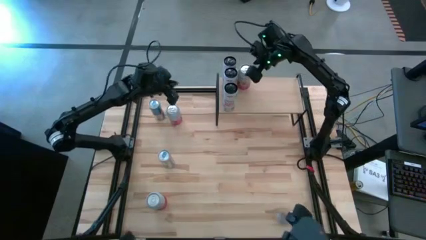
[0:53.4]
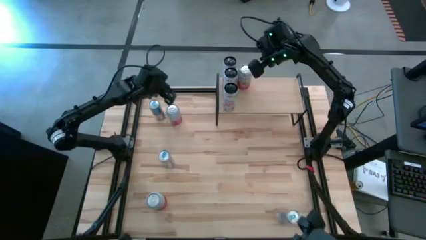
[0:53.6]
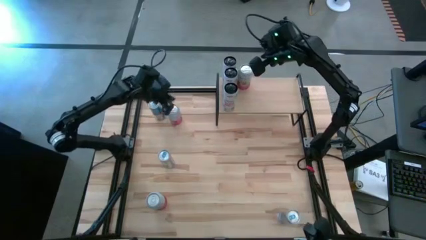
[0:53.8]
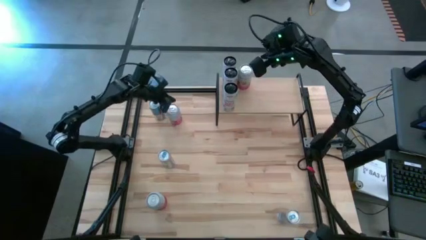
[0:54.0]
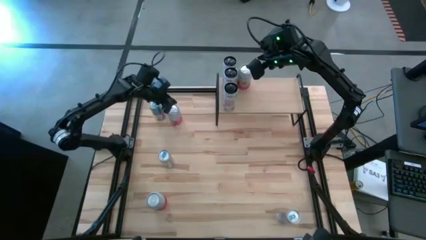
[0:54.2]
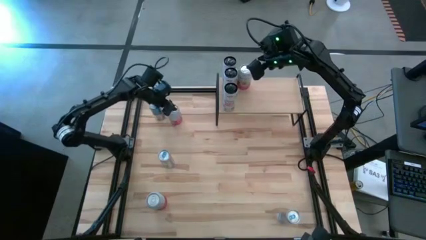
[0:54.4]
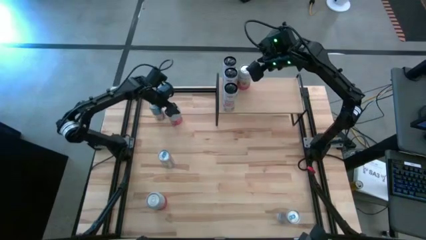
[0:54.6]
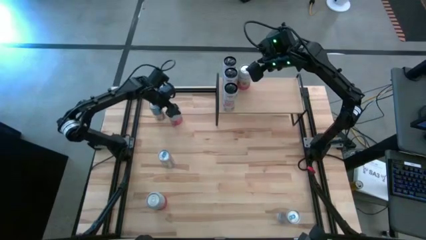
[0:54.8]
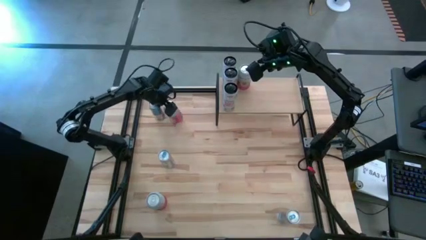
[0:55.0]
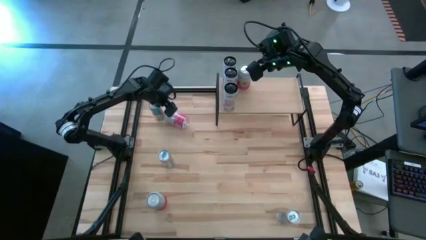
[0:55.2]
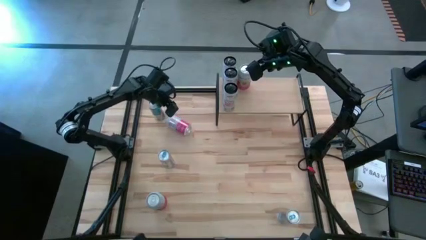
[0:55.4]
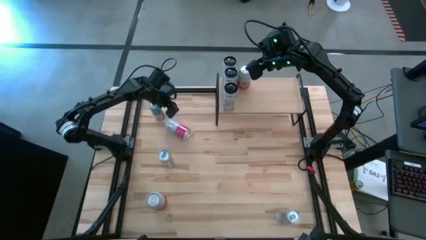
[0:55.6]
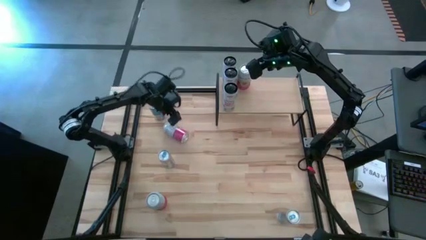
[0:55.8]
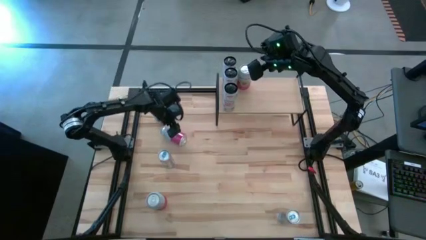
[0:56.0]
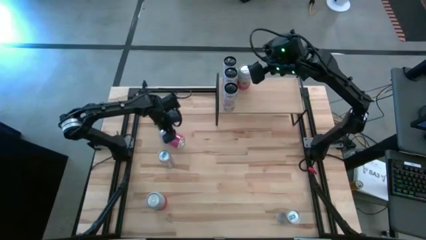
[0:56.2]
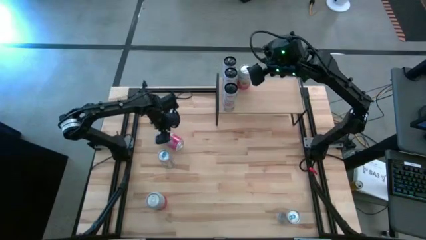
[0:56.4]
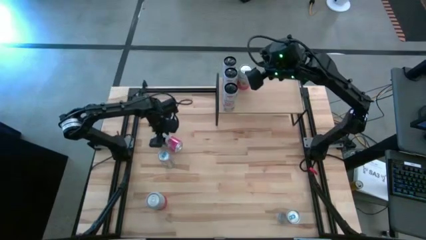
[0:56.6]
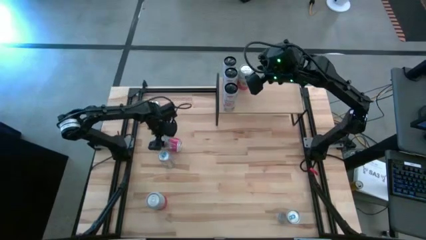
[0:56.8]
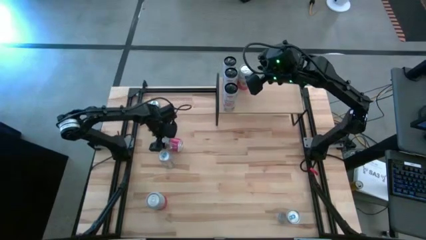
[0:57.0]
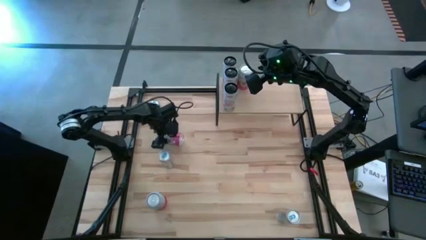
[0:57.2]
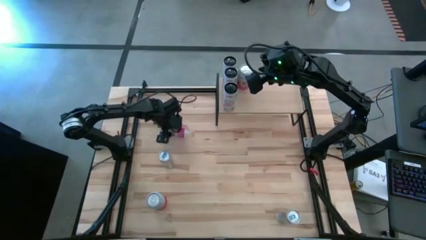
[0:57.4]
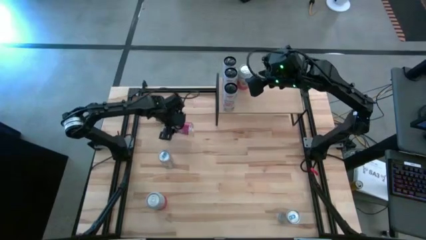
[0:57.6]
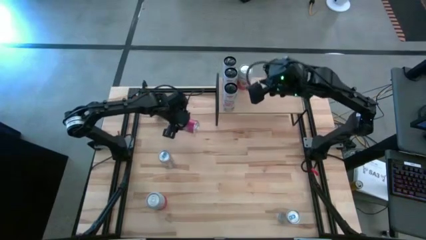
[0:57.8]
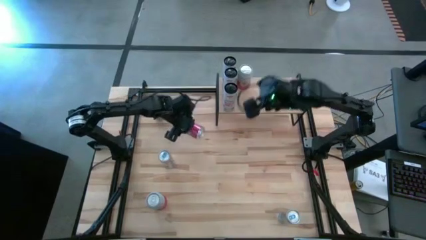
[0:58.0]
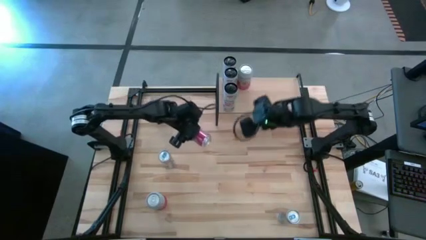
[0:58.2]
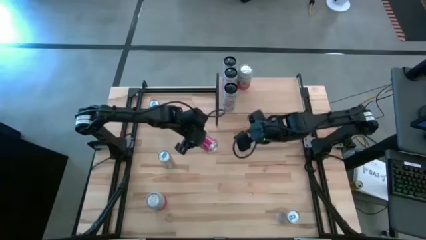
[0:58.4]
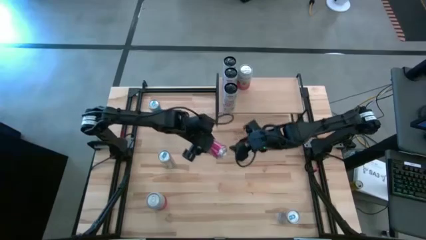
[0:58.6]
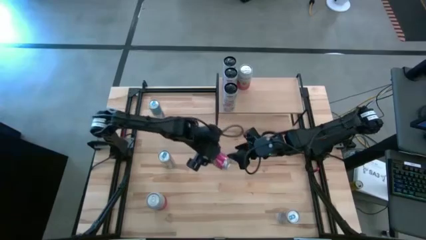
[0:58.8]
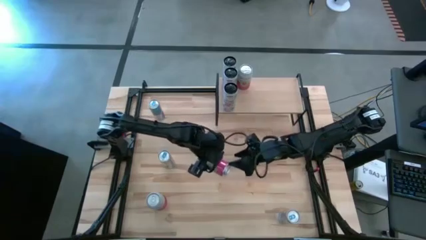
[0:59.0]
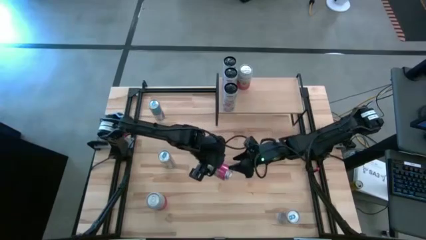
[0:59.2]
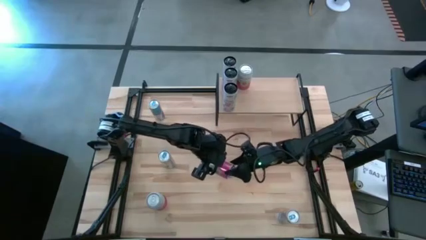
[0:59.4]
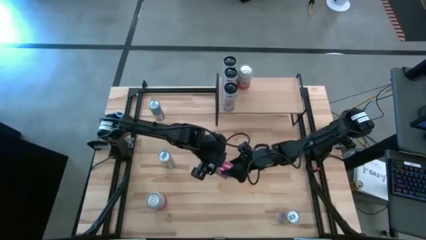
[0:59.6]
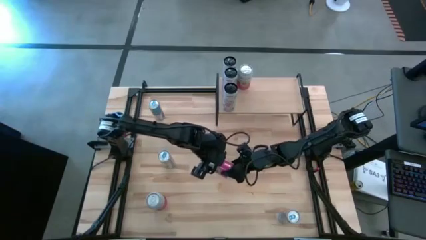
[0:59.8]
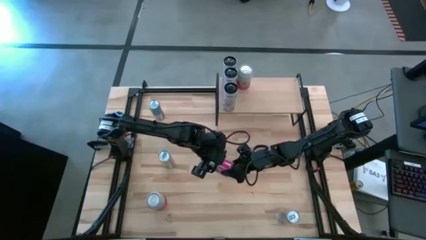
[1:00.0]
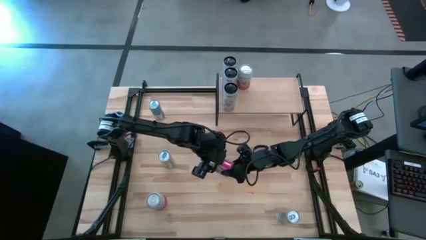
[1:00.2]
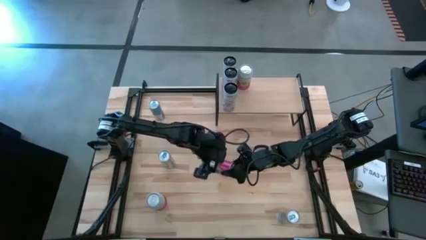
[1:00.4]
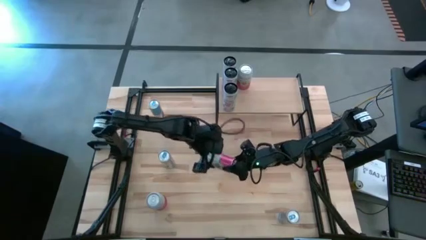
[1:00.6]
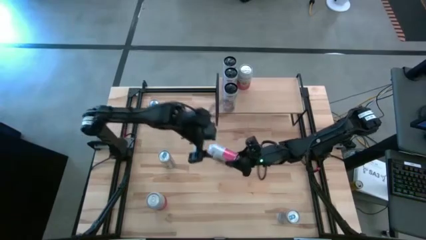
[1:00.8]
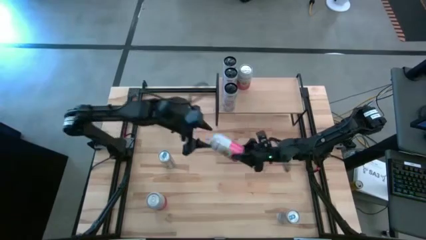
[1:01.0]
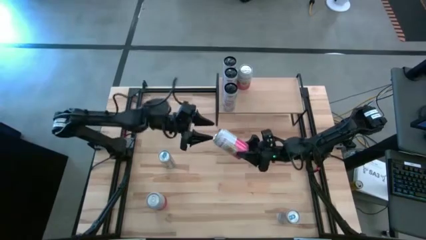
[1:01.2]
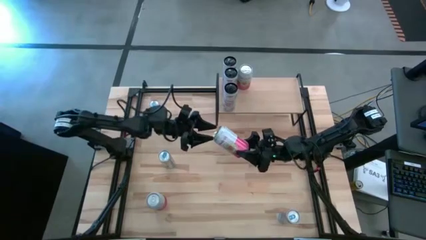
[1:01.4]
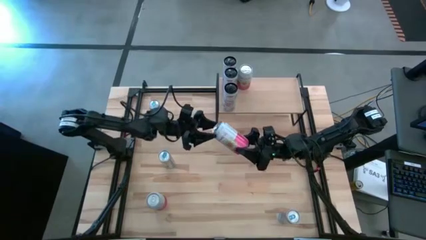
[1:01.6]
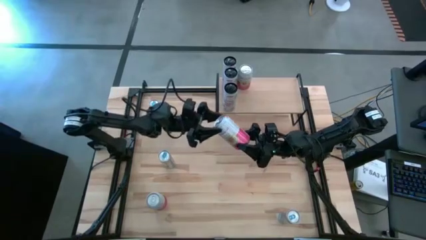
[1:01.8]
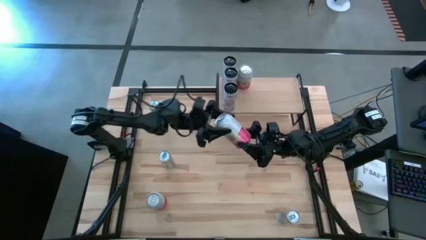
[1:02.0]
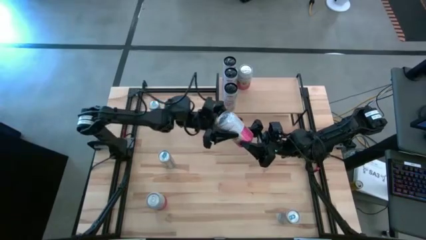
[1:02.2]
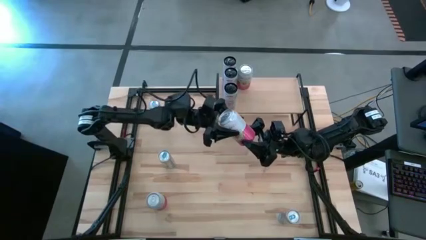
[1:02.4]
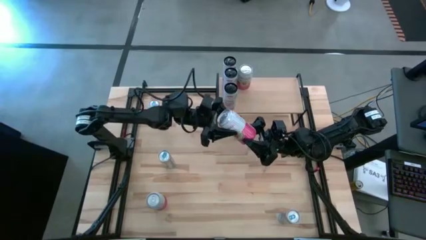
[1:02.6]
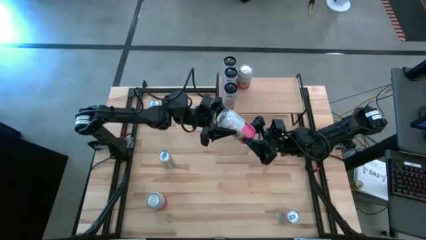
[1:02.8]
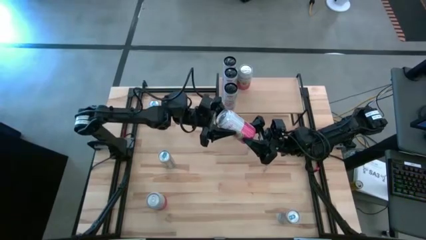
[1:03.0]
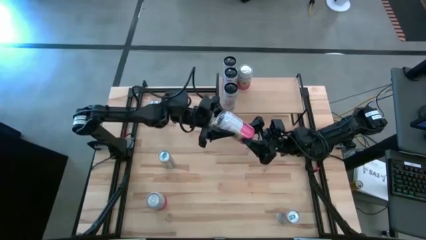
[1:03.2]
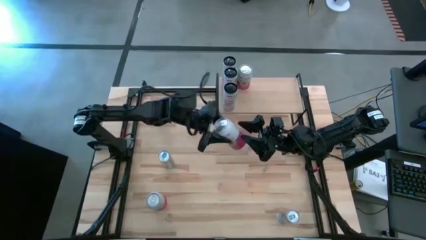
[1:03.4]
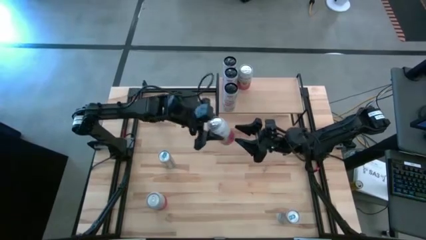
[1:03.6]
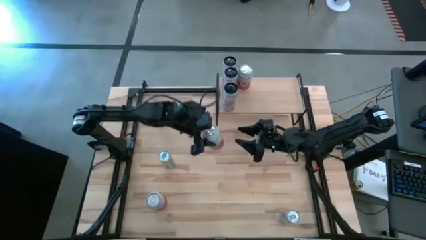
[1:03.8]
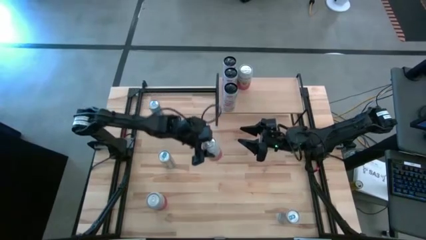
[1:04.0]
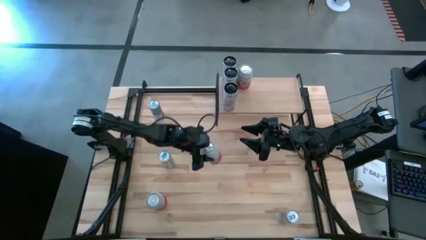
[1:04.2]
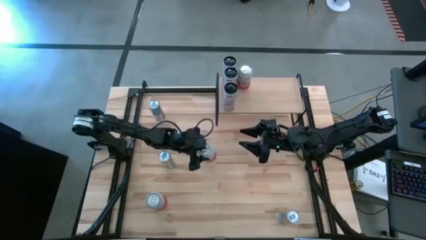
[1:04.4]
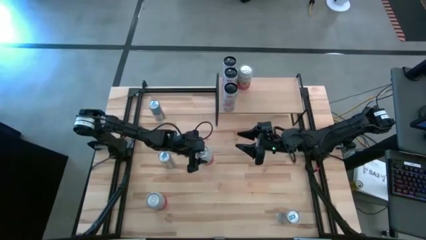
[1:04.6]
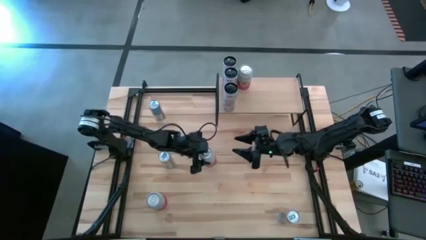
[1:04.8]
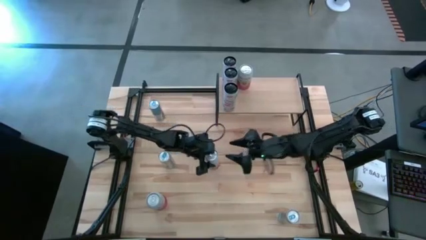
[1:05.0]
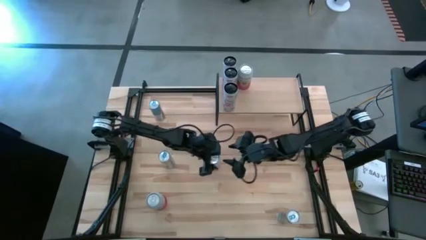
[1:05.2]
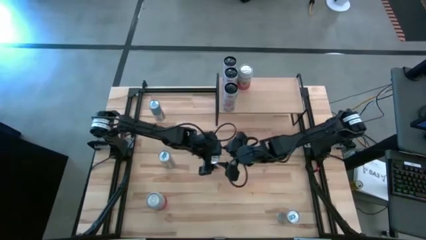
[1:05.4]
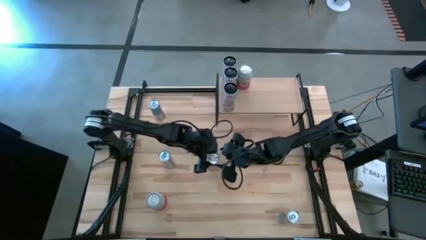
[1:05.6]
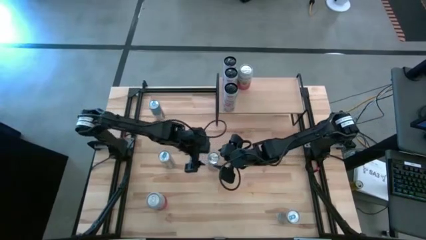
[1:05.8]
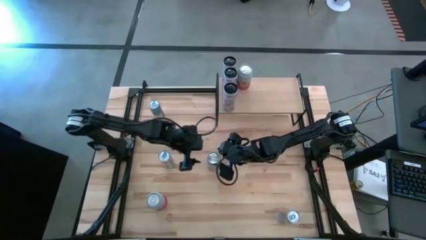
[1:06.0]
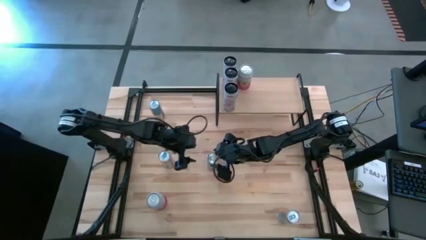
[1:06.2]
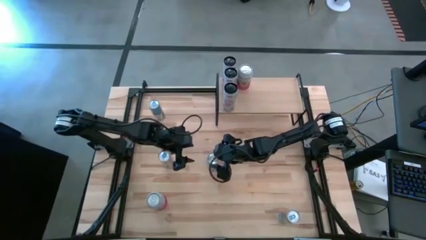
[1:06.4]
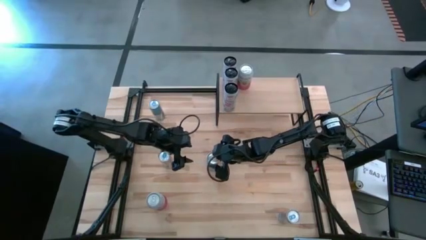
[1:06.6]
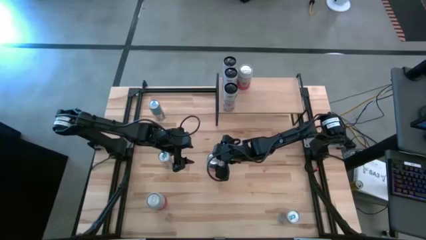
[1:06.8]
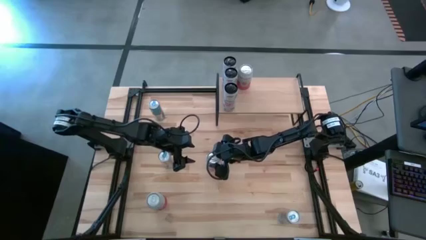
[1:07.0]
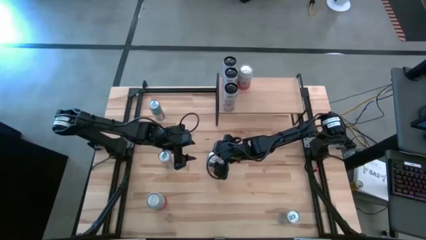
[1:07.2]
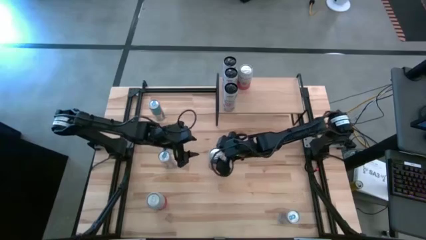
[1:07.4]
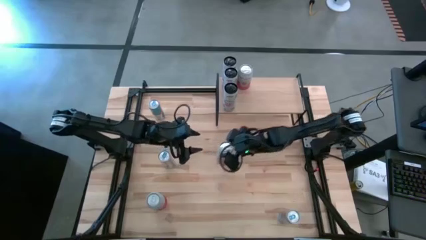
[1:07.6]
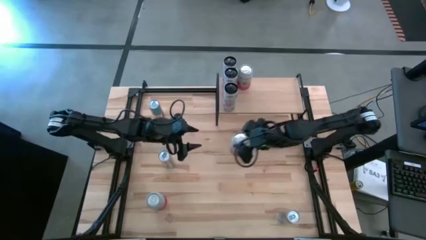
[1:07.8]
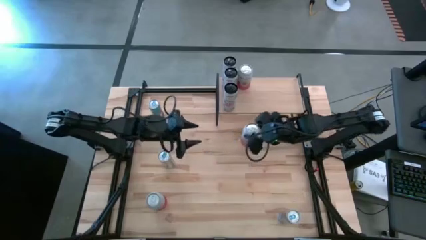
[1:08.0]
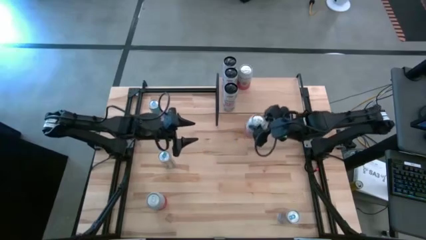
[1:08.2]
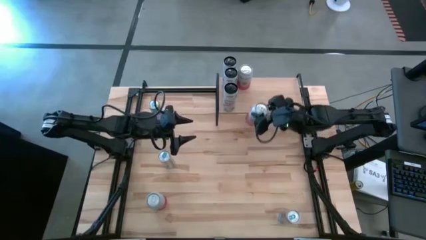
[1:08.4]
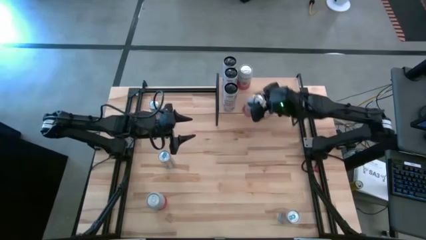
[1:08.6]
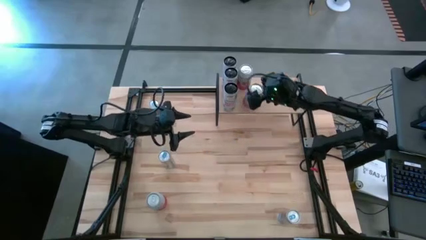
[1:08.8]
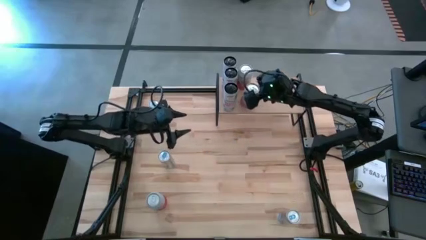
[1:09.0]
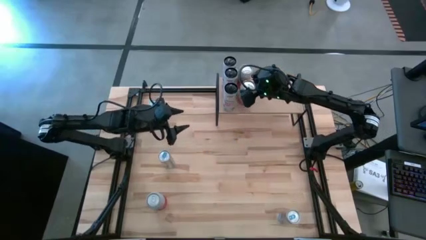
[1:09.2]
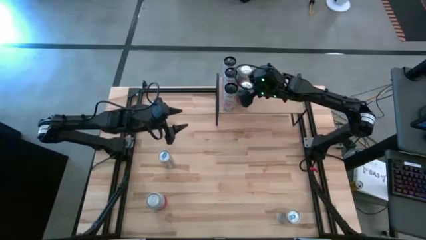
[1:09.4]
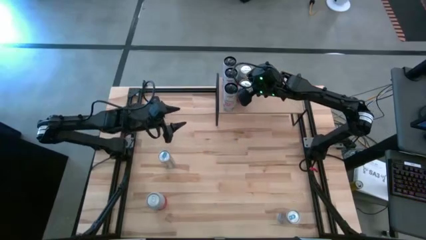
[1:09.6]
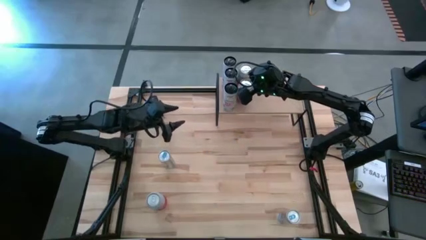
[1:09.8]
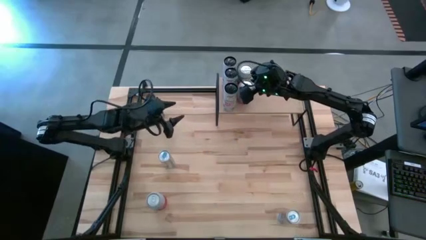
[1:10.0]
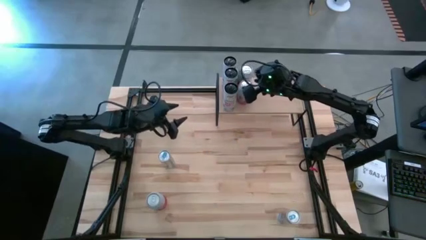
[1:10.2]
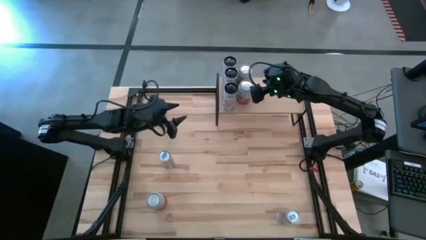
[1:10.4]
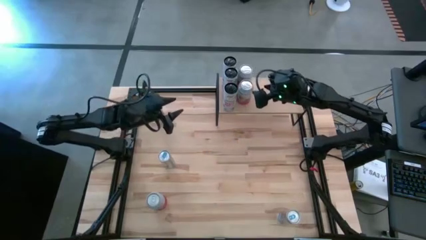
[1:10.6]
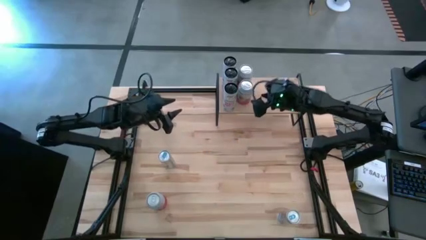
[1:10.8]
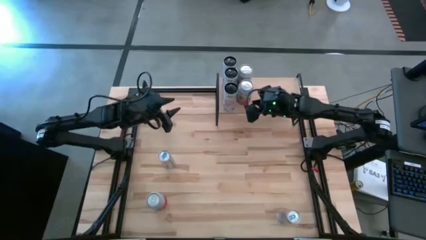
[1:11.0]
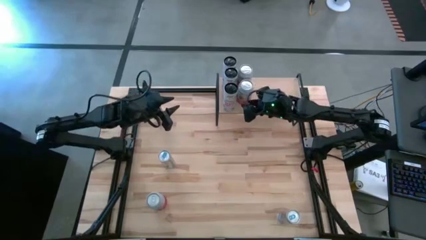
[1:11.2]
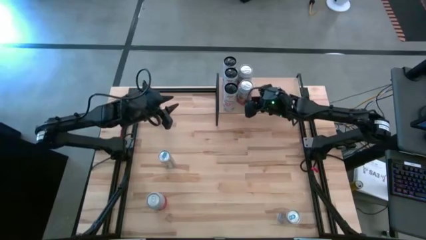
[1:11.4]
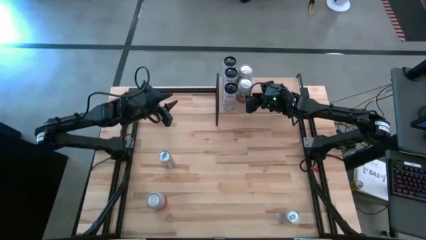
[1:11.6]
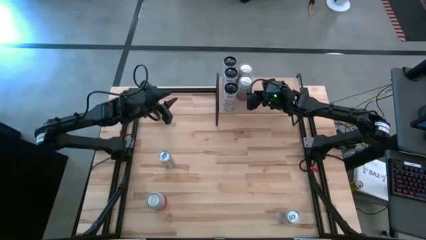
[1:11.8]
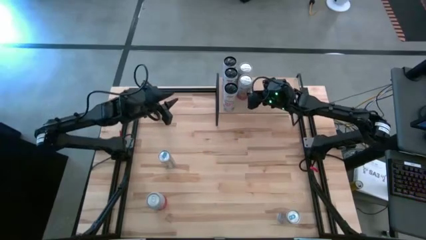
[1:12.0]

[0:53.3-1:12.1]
Task: Place canned beverage on shelf
Put the top pink and white soda can aligned with the other pink soda can on the shelf
